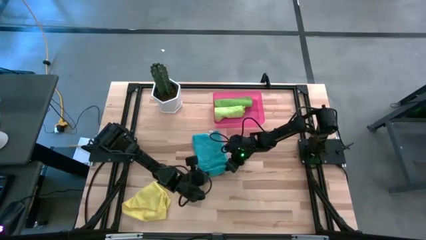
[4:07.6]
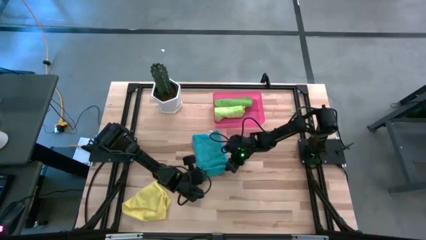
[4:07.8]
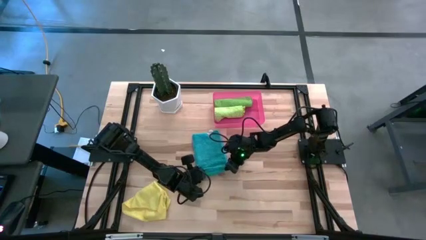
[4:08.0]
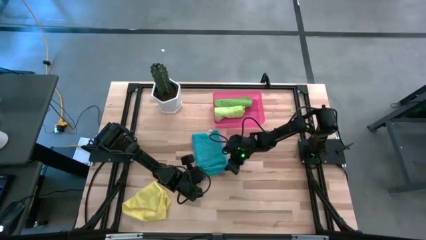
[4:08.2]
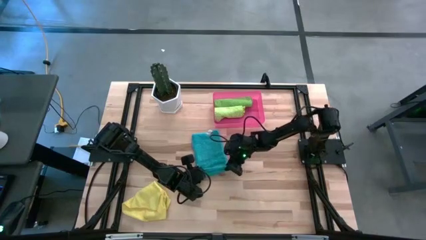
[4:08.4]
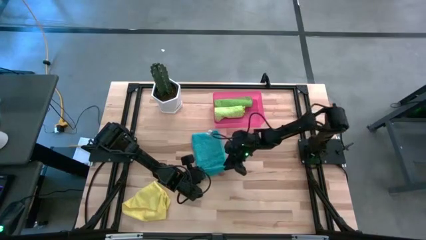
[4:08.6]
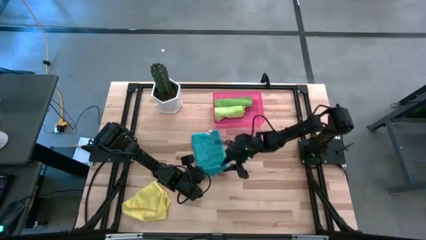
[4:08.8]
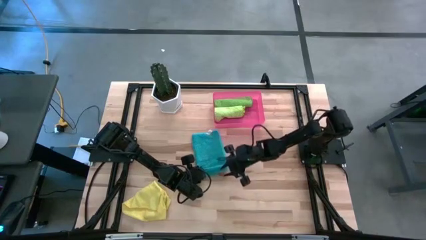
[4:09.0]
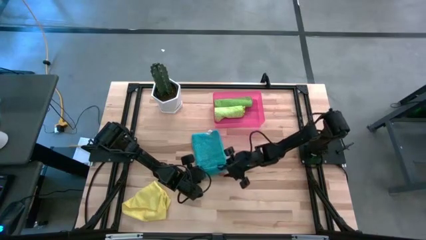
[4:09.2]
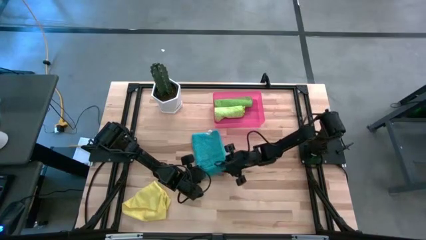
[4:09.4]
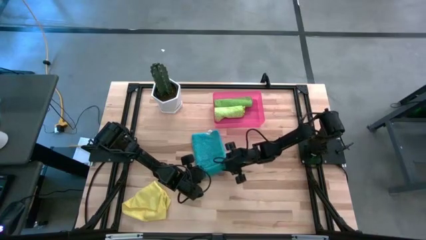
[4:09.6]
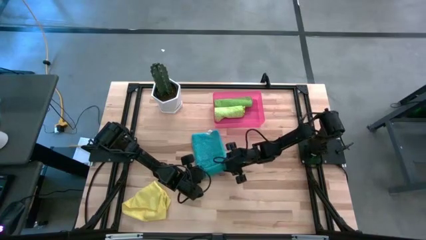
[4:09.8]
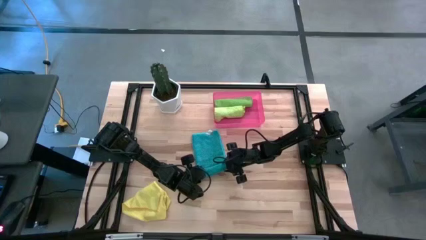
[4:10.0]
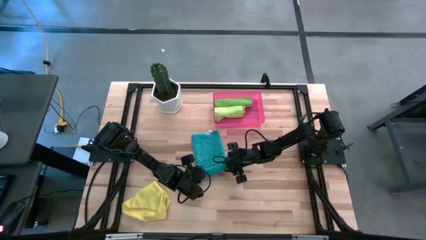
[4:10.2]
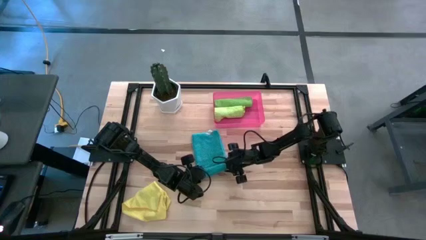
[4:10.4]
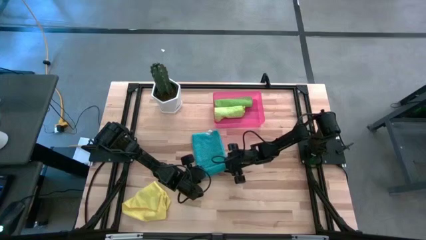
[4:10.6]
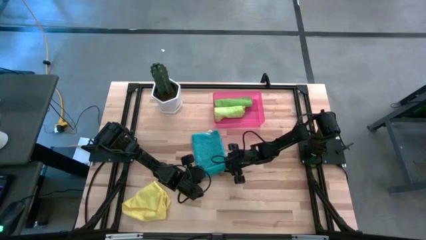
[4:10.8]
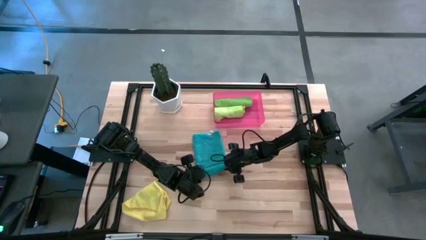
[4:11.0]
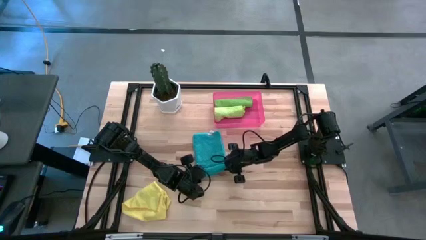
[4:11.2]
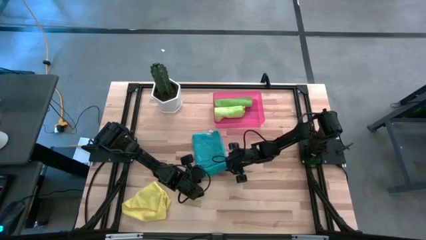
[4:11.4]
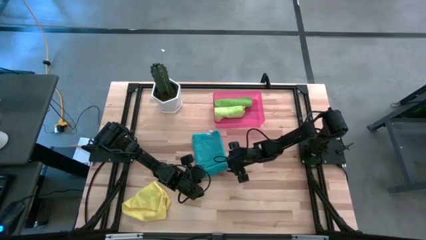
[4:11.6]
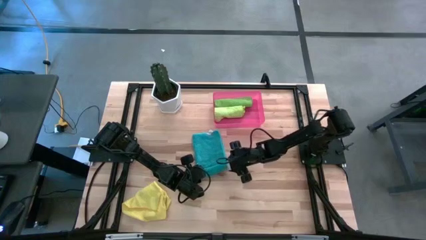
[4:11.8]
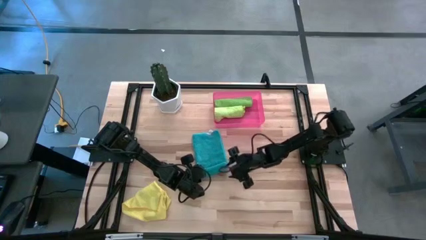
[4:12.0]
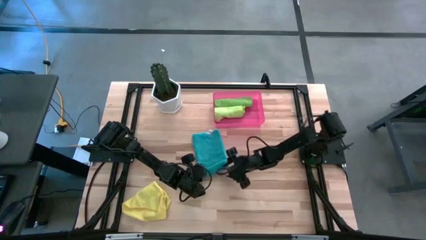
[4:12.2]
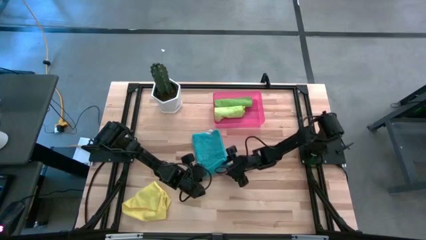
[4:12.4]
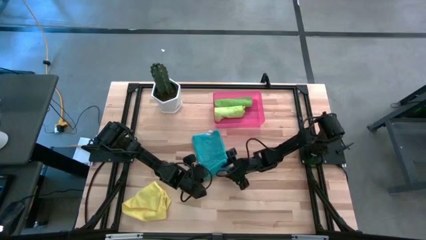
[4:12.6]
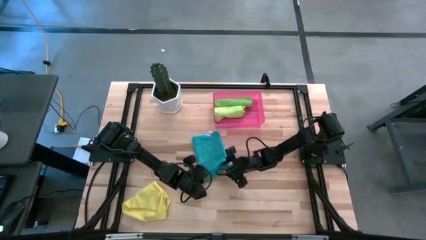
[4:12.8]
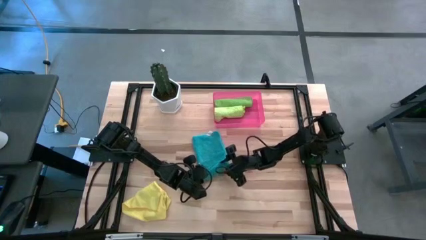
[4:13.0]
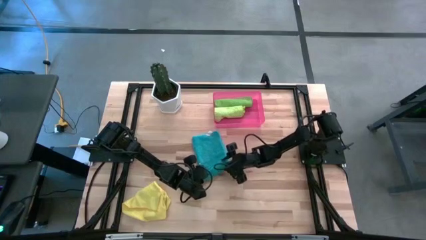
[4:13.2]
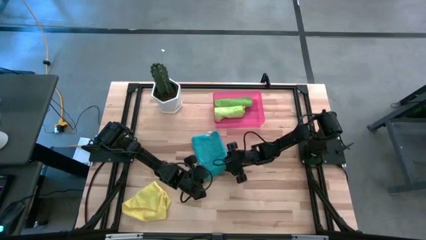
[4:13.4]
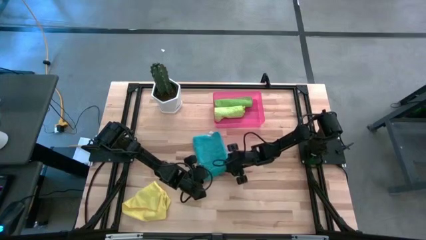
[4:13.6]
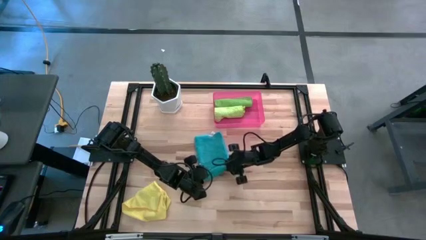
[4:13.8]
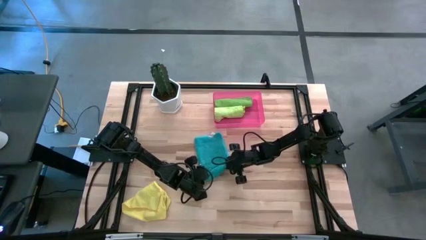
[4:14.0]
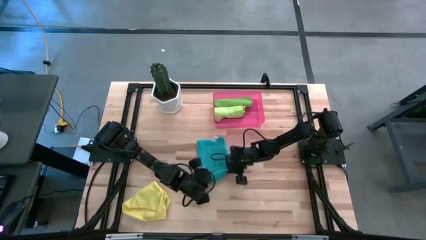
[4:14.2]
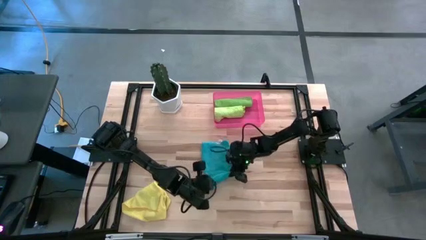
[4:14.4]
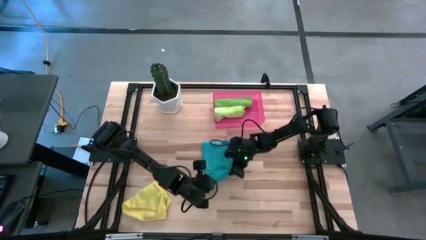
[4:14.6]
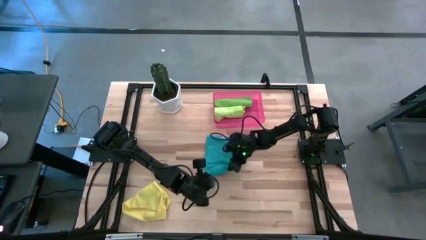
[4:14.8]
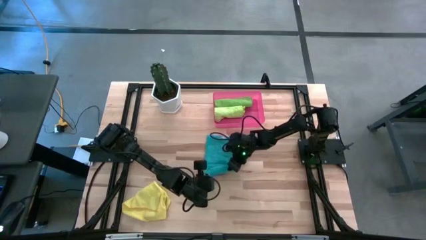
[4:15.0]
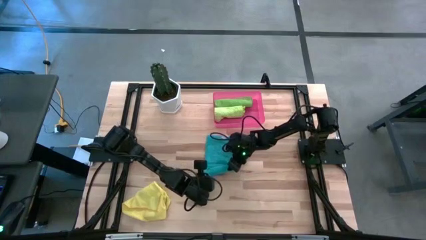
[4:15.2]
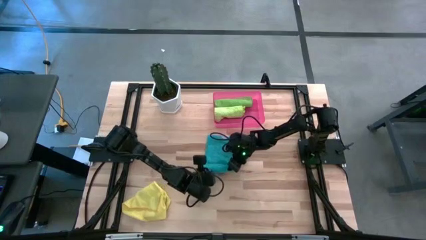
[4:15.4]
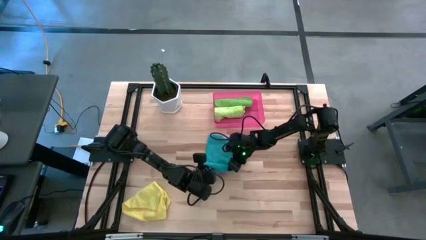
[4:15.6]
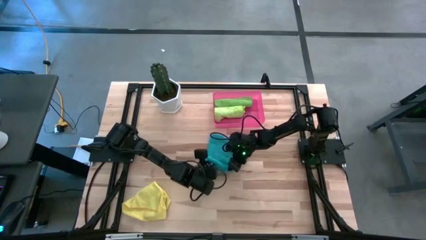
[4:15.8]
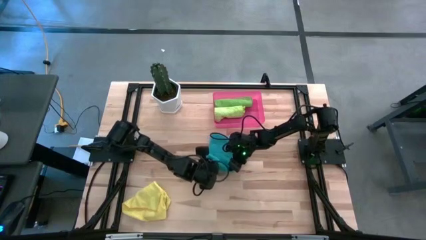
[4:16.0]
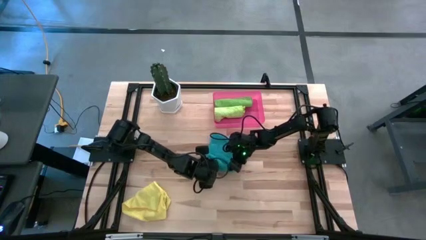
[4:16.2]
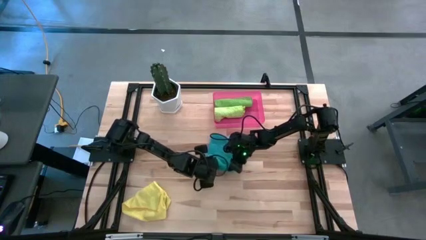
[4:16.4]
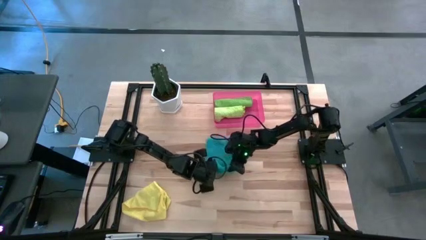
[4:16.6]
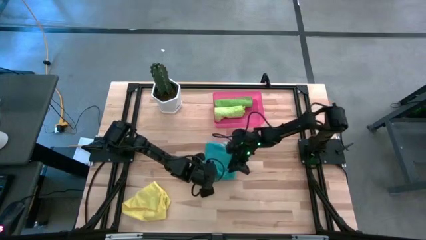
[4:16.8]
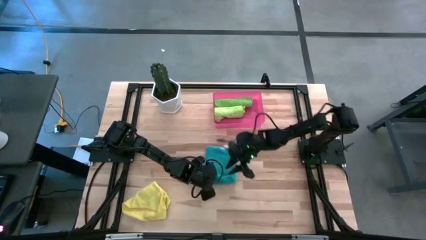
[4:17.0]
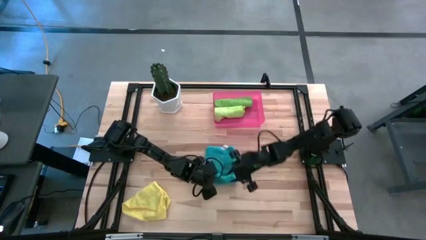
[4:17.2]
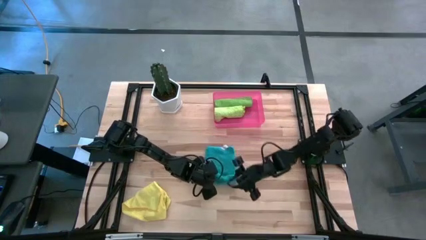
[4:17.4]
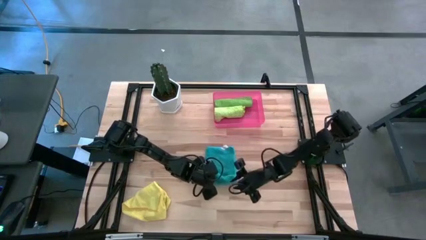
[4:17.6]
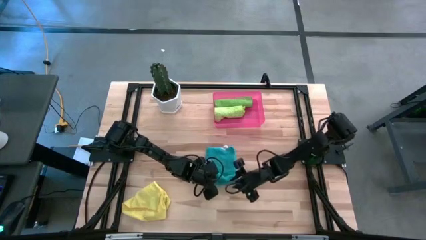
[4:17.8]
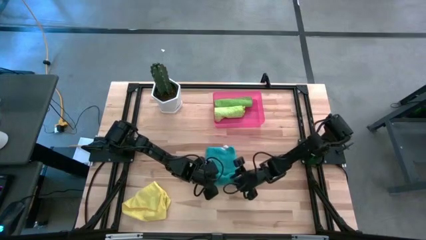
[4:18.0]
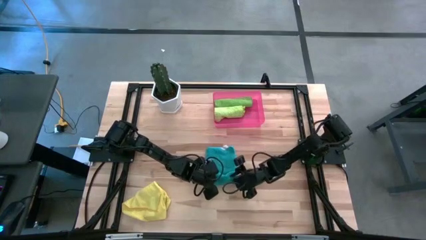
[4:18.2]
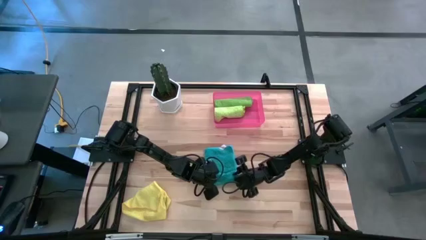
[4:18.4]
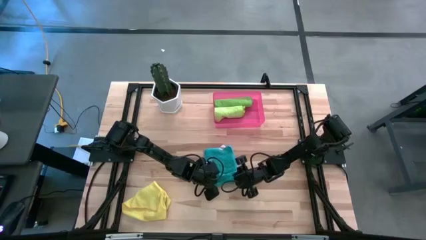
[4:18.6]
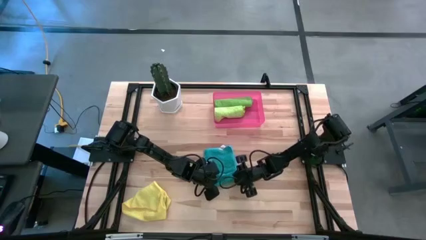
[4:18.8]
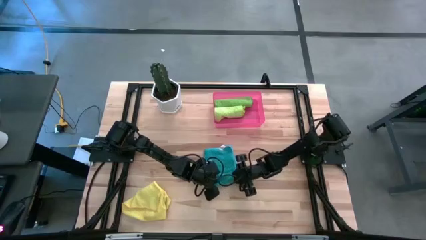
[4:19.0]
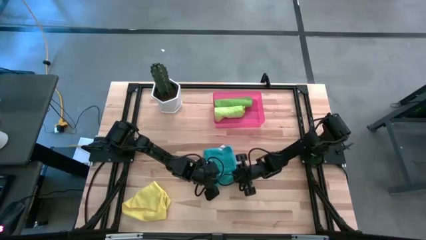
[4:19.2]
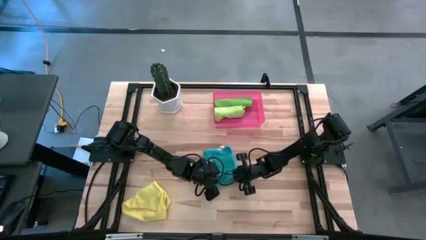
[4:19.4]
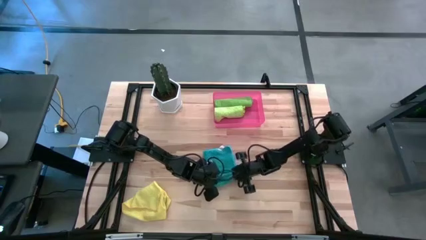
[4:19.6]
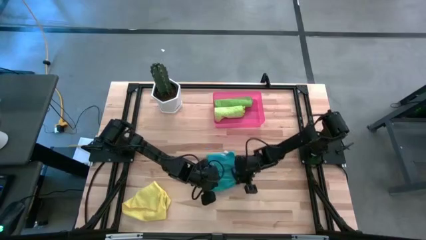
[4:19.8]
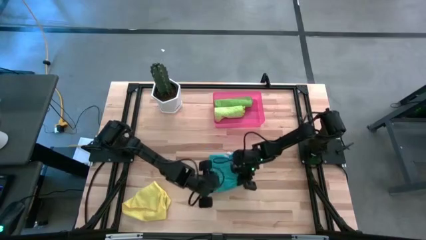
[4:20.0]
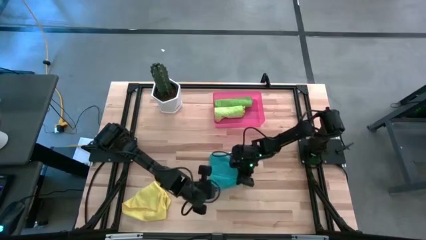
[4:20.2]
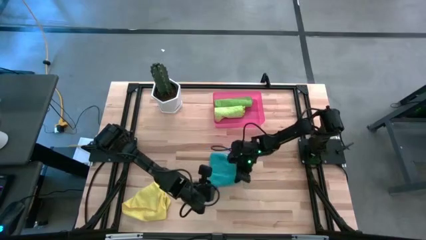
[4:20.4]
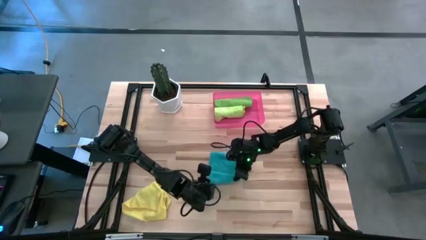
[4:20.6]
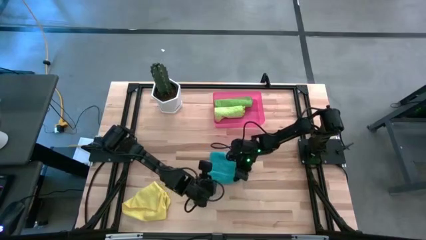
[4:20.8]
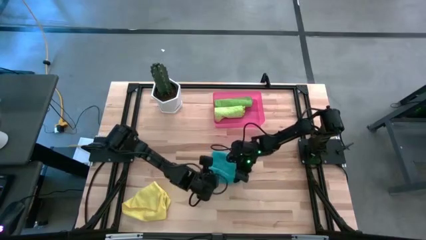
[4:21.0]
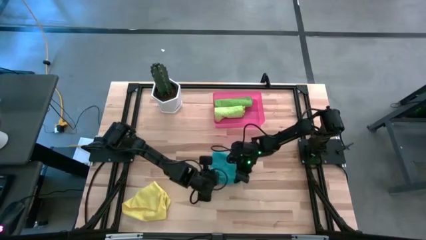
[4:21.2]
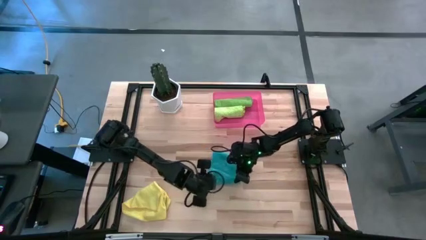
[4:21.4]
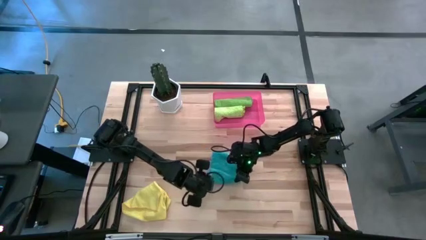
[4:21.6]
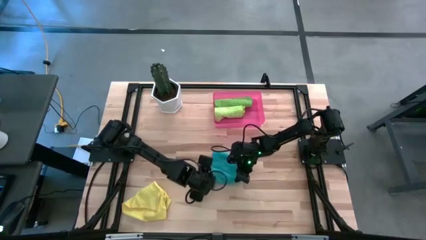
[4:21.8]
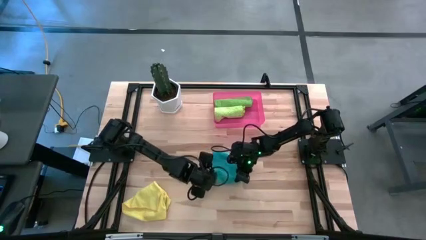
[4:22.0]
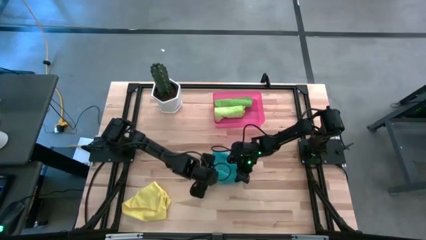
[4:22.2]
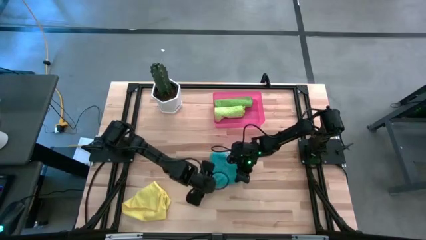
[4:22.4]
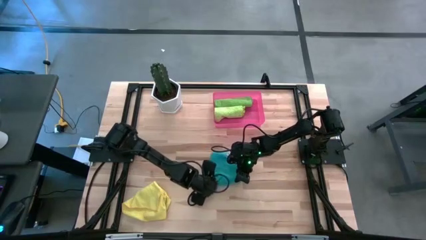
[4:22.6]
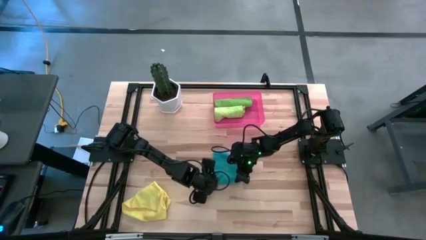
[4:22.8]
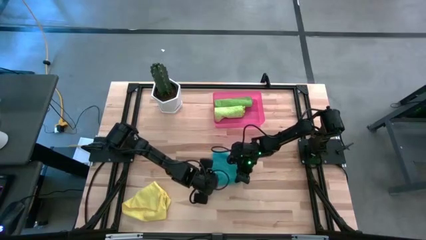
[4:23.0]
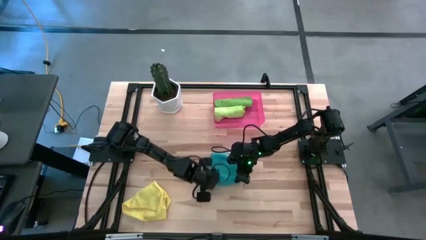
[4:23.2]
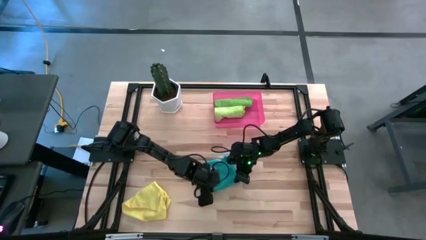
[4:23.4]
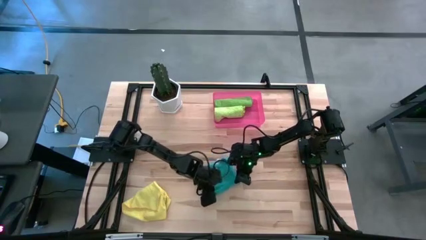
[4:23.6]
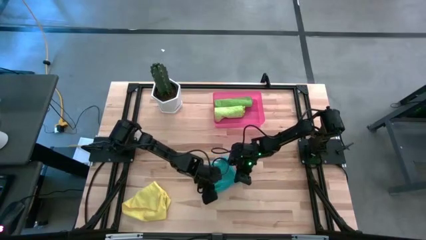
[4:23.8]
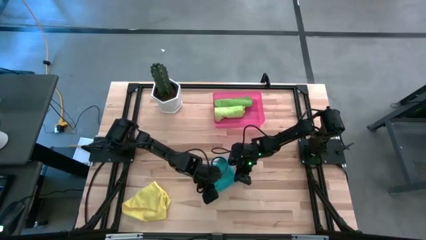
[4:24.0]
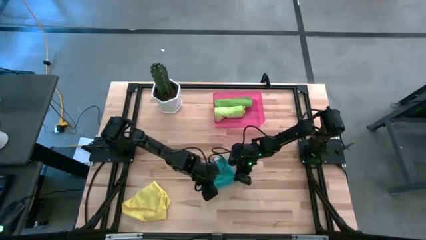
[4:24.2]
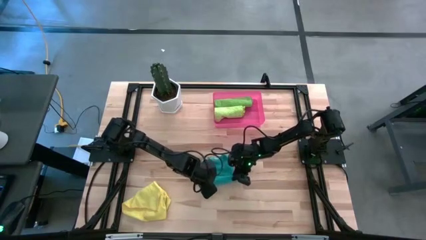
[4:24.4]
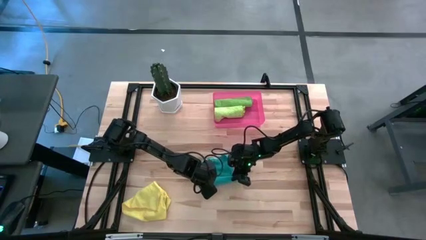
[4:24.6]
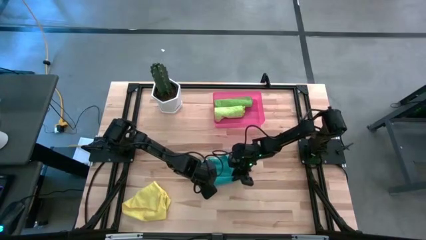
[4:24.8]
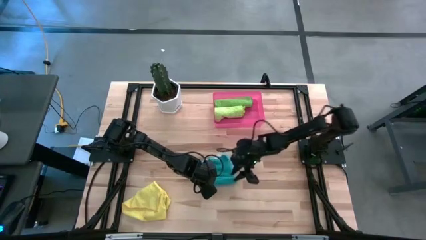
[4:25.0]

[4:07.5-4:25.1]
Task: Roll microfiber towels into tight, uniform cylinder then place into a basket
Roll the blue microfiber cloth
